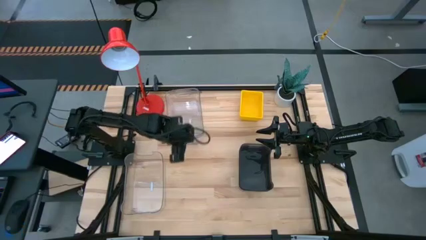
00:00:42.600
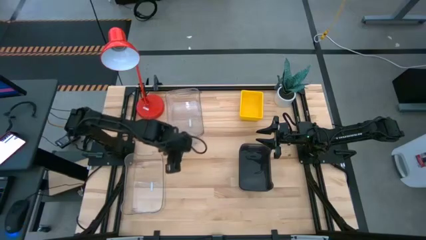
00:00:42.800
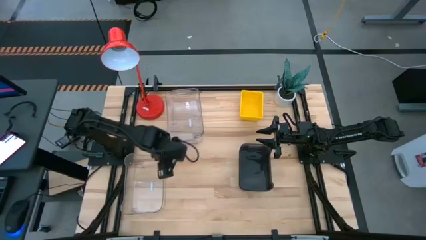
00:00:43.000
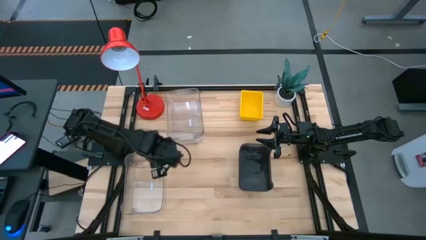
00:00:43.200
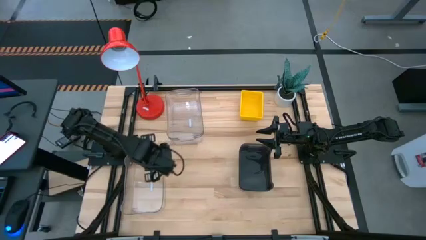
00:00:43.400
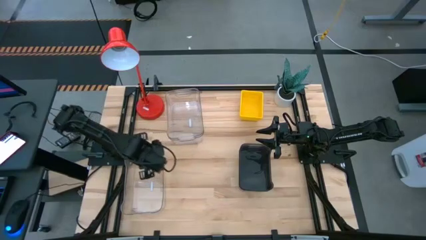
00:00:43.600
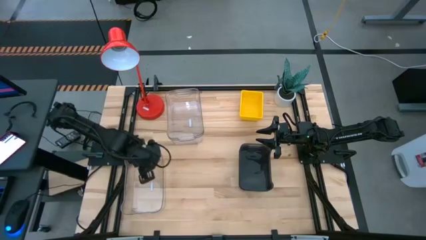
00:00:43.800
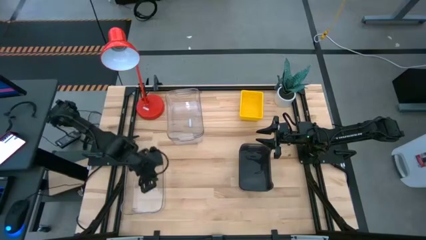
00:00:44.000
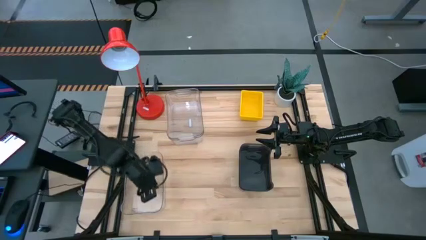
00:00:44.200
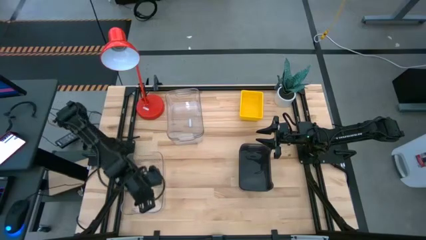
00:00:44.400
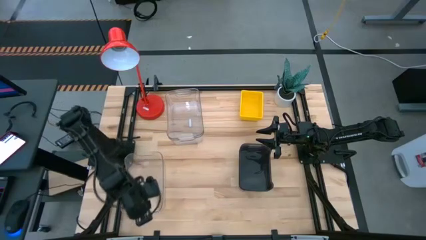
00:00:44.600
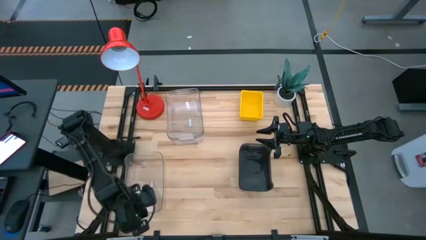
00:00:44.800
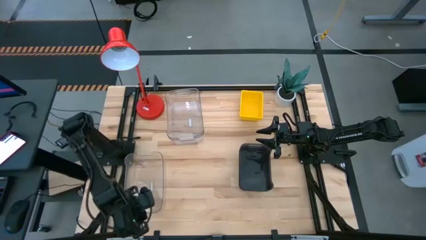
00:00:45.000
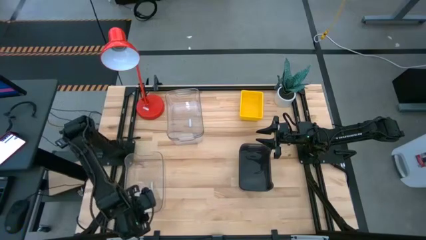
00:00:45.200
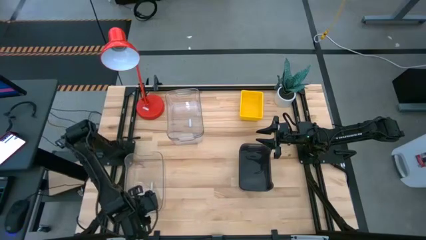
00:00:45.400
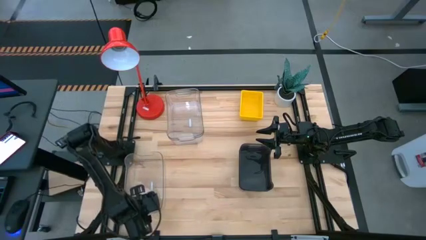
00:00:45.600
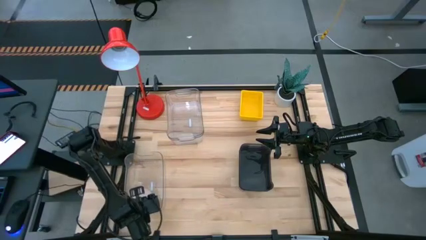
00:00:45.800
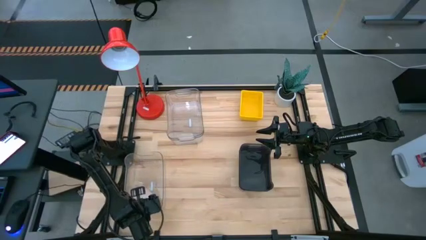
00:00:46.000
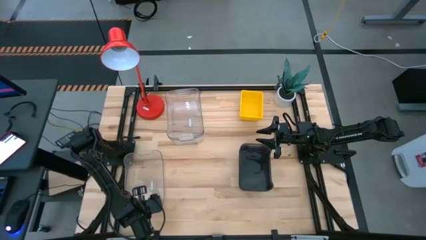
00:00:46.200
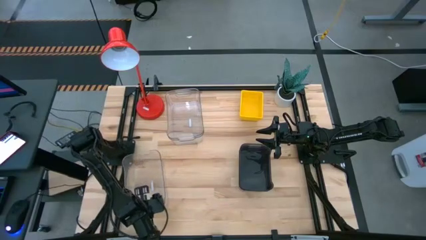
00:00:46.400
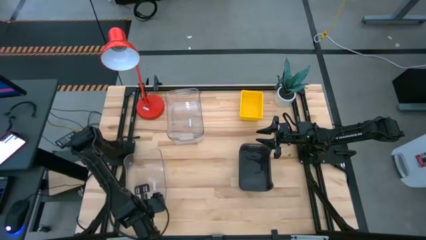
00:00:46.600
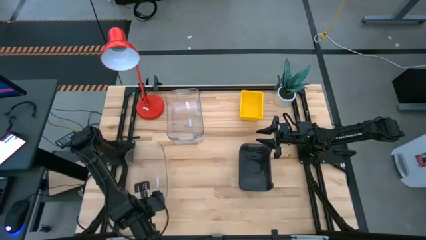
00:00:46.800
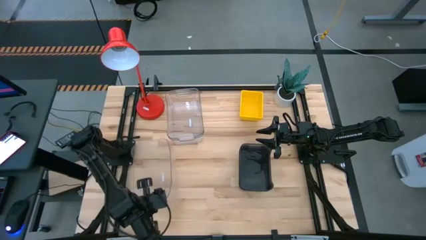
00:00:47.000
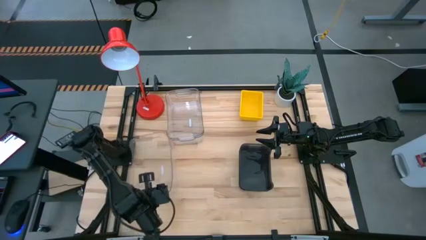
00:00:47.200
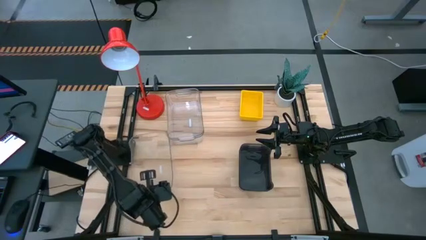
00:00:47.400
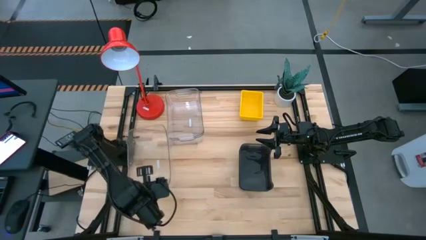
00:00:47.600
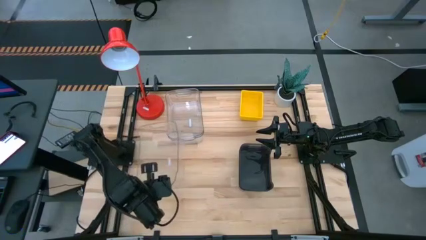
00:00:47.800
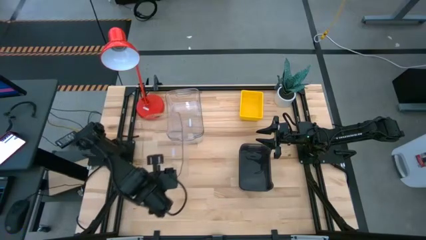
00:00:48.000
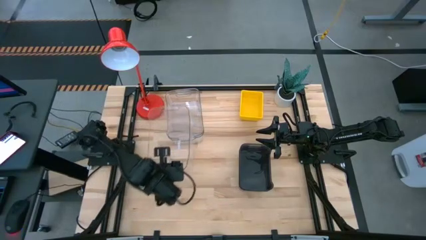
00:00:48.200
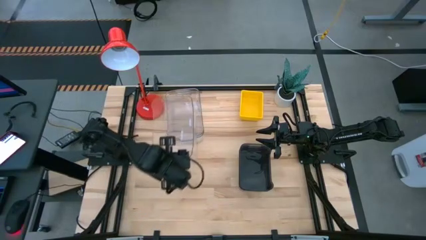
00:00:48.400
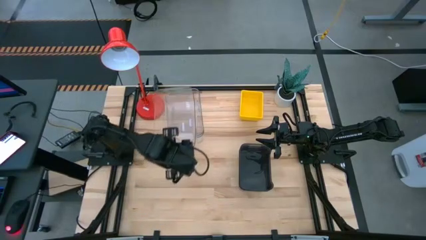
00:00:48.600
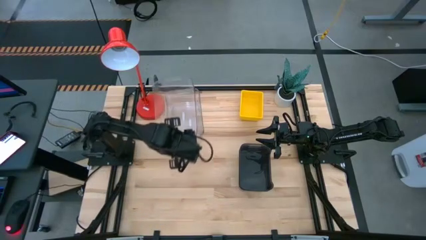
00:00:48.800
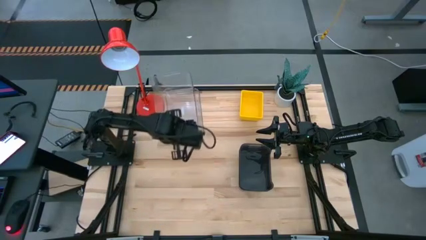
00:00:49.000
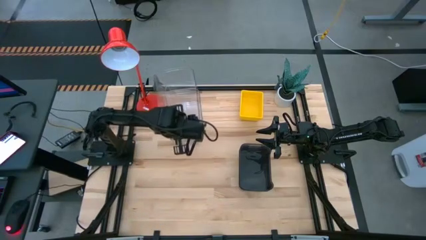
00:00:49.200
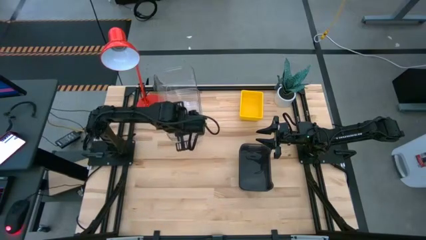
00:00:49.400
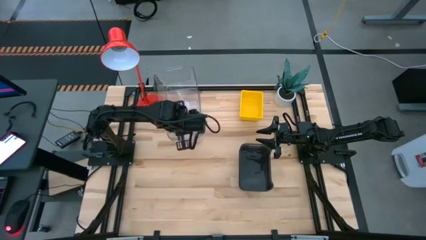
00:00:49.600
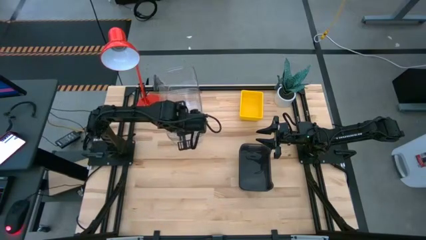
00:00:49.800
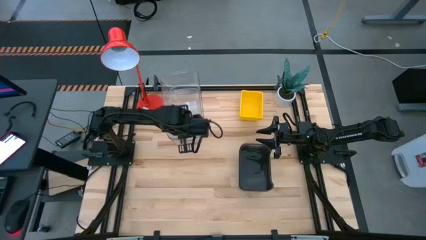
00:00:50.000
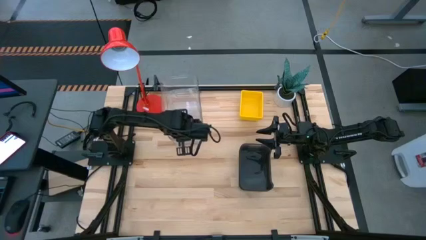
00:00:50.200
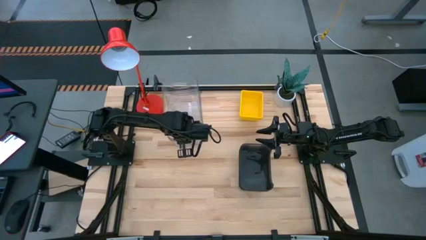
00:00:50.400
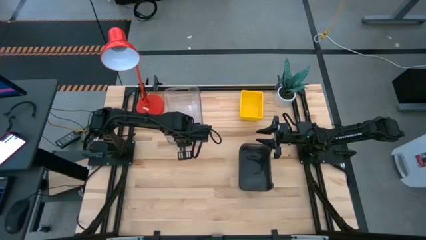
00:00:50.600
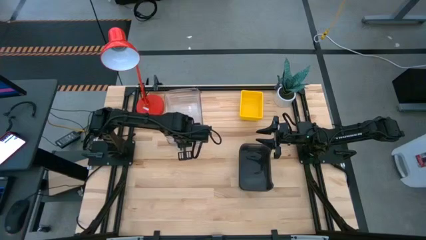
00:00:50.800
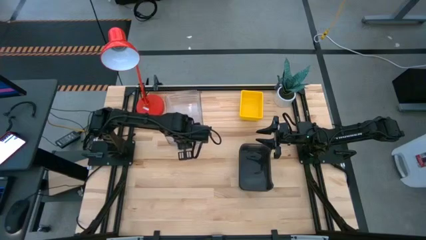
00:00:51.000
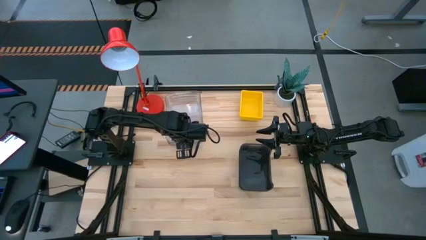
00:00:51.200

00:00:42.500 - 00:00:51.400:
Stack the bottom transparent bin on the transparent bins

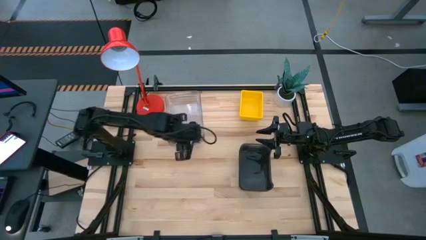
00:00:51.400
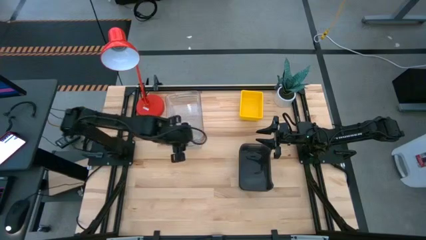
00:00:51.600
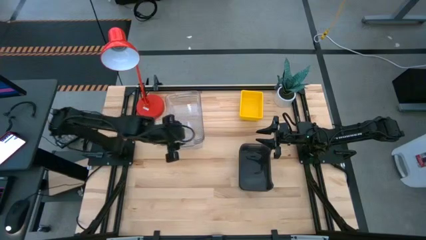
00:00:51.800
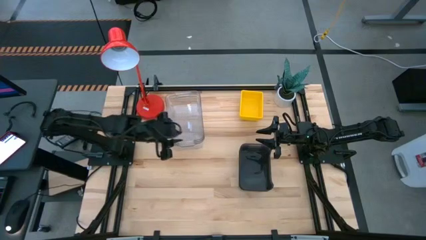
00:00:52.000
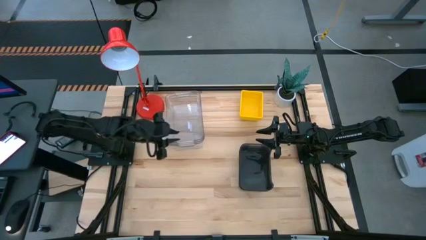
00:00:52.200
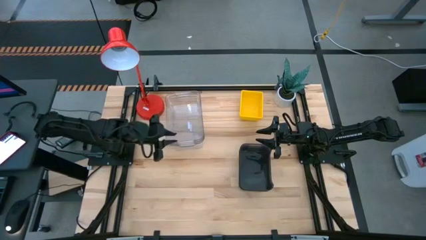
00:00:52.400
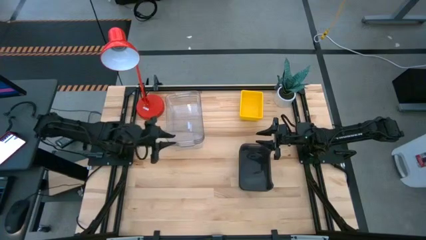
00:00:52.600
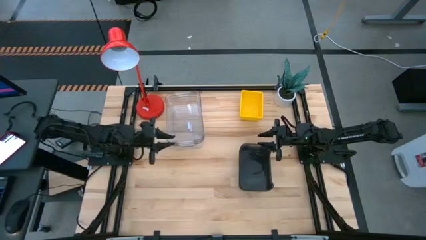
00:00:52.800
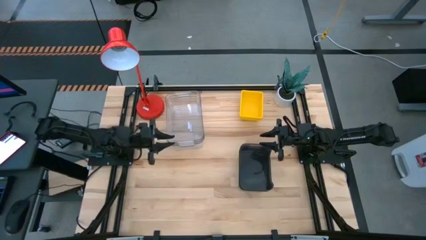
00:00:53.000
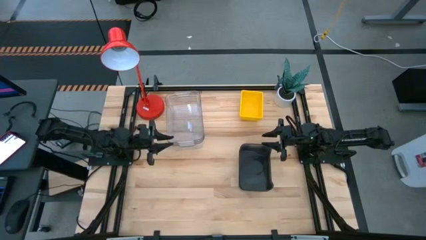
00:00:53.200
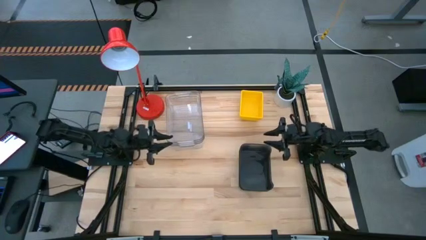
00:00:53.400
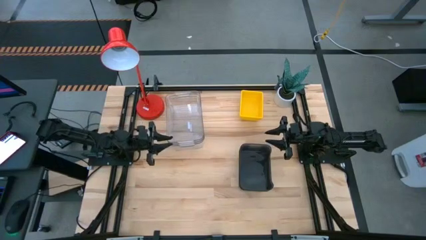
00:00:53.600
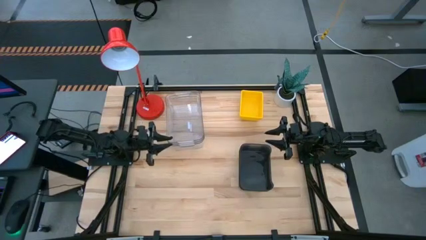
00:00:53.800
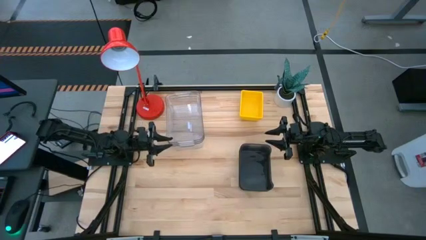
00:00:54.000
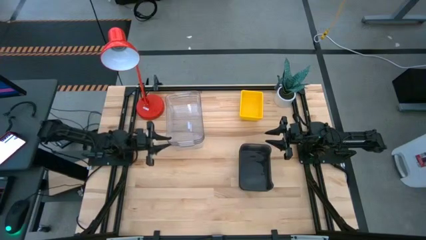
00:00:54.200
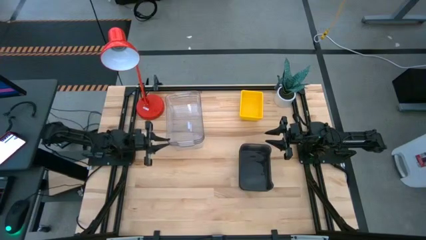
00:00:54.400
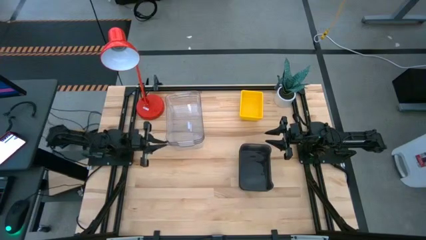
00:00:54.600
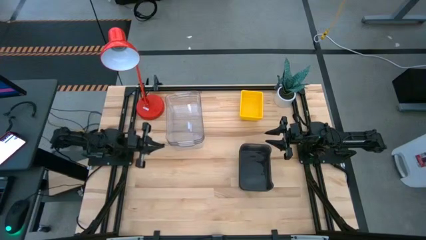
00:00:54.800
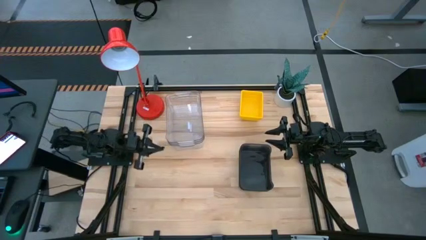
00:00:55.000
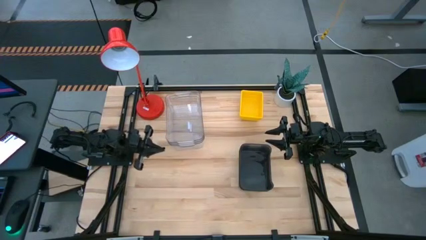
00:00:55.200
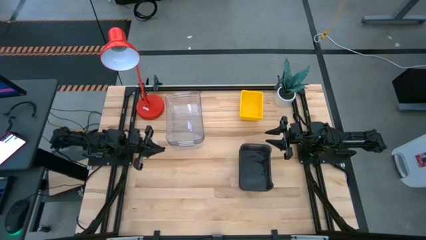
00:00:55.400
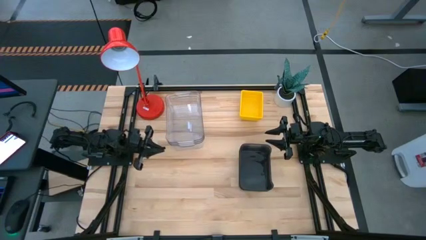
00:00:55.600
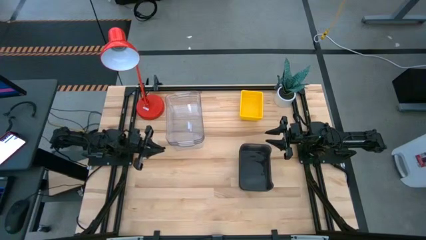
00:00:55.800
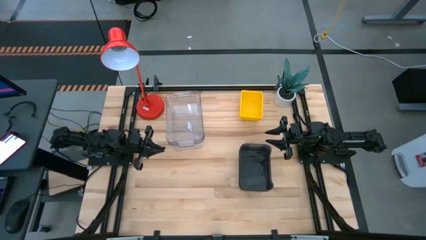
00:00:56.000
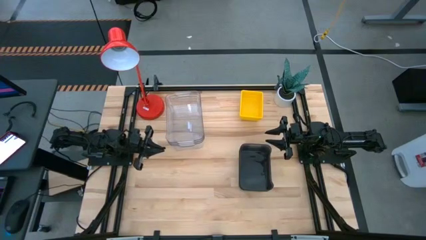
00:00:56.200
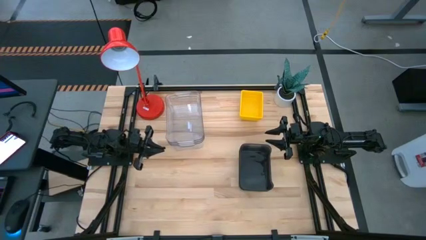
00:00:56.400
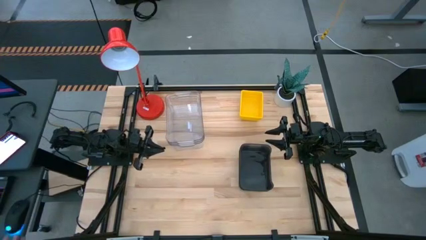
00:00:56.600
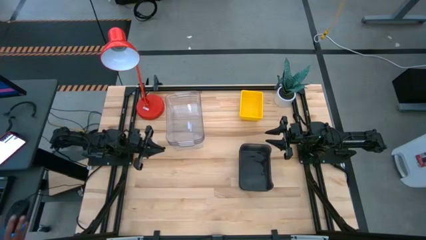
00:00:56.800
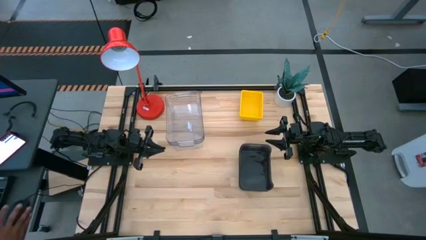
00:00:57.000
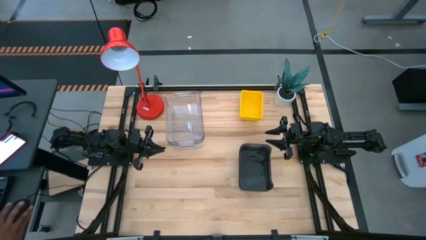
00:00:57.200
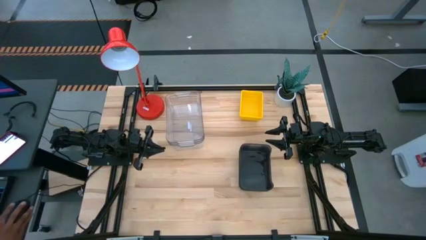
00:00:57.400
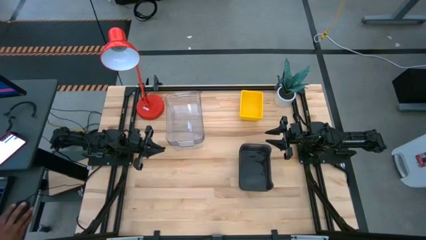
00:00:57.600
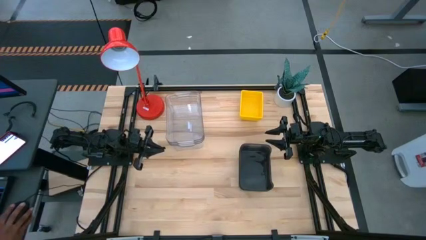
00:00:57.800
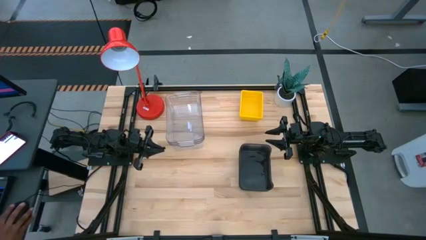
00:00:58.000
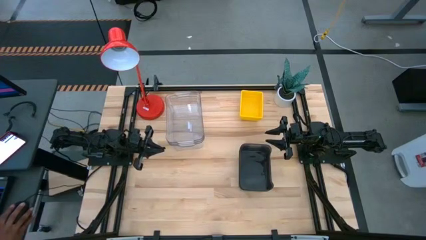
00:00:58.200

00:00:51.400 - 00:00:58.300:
Return to Home Position
